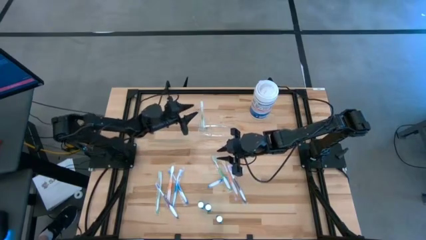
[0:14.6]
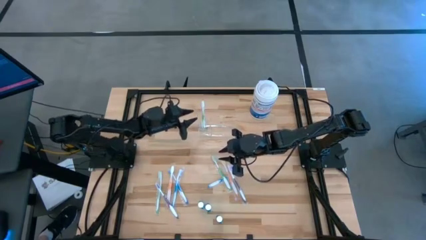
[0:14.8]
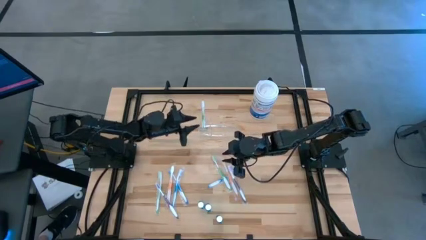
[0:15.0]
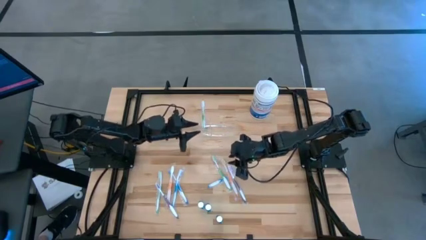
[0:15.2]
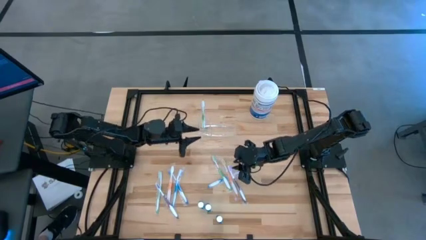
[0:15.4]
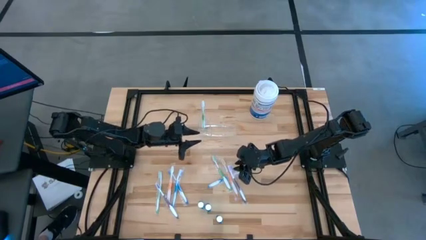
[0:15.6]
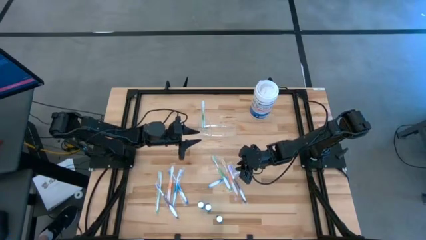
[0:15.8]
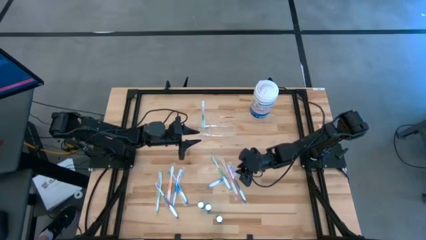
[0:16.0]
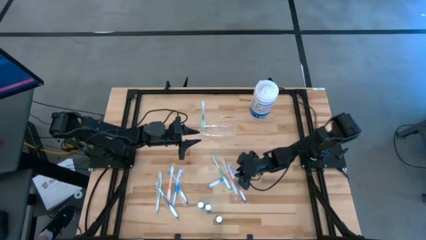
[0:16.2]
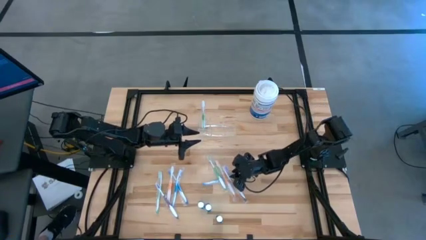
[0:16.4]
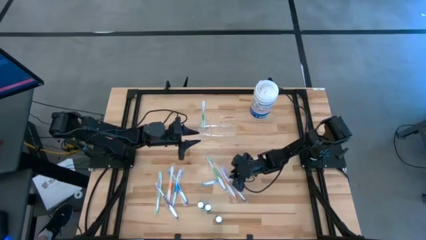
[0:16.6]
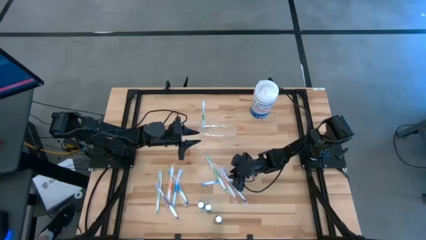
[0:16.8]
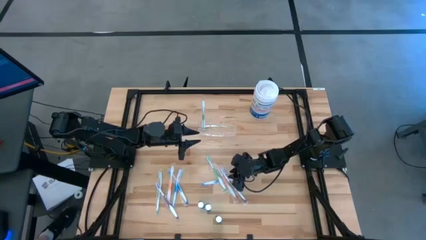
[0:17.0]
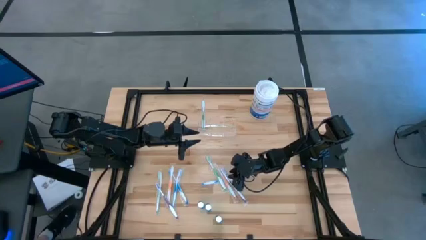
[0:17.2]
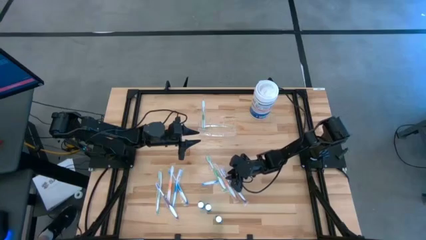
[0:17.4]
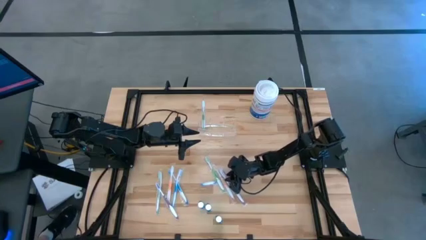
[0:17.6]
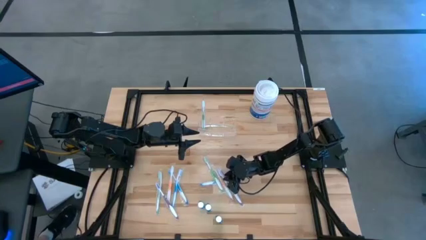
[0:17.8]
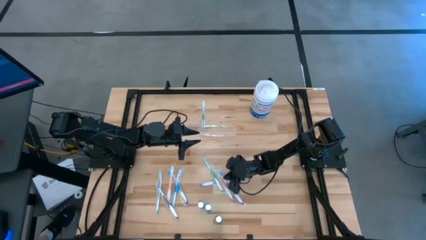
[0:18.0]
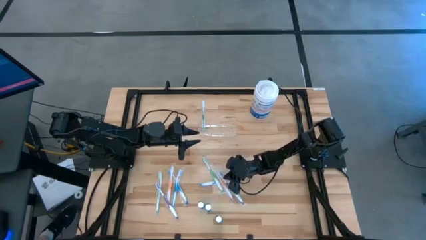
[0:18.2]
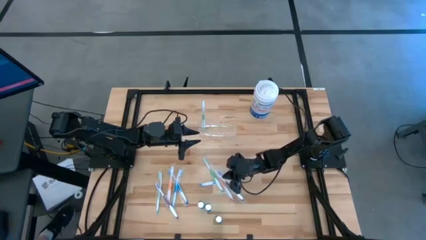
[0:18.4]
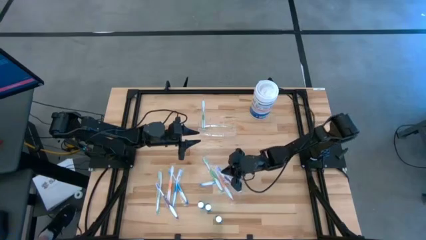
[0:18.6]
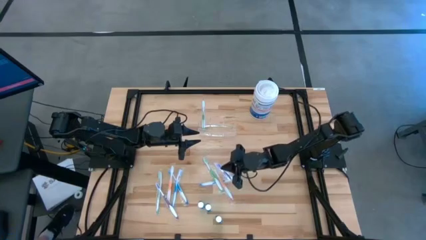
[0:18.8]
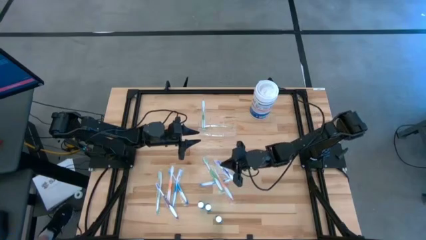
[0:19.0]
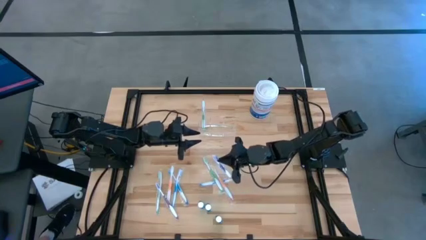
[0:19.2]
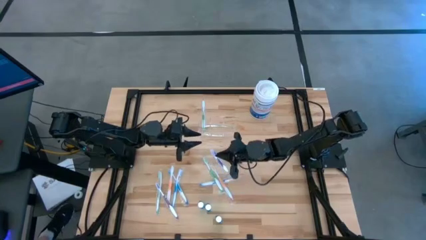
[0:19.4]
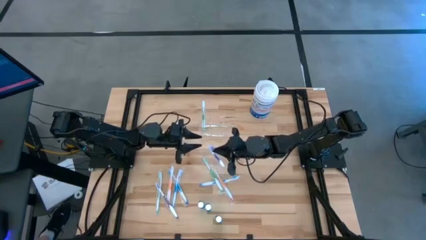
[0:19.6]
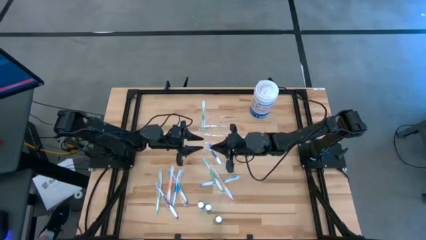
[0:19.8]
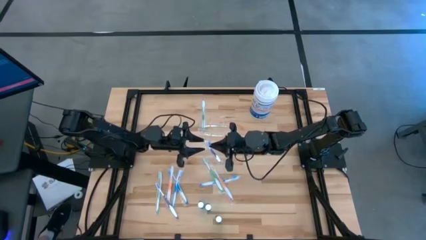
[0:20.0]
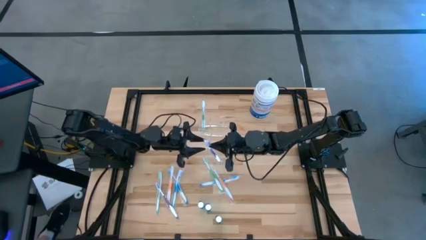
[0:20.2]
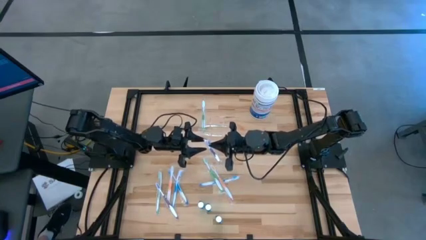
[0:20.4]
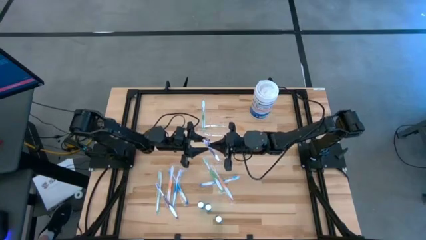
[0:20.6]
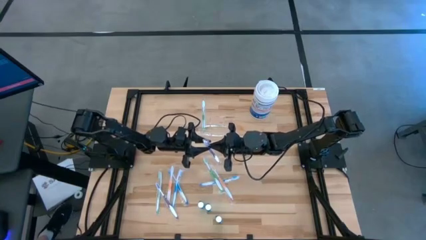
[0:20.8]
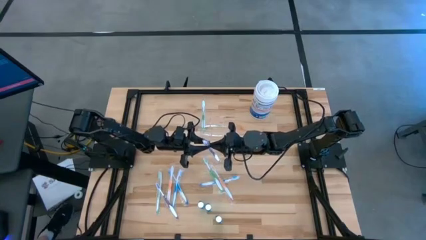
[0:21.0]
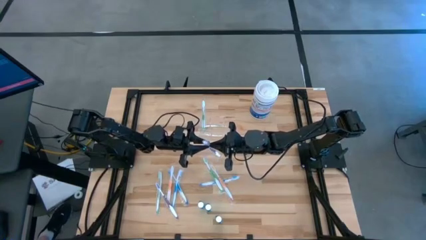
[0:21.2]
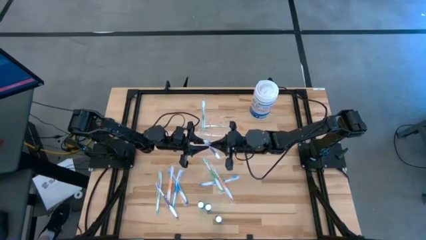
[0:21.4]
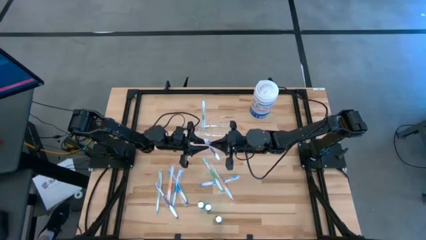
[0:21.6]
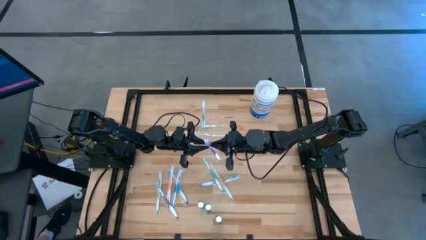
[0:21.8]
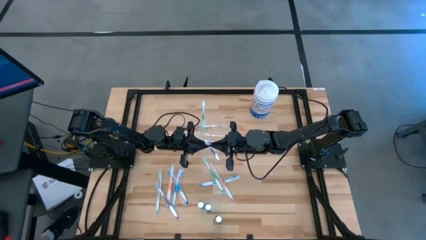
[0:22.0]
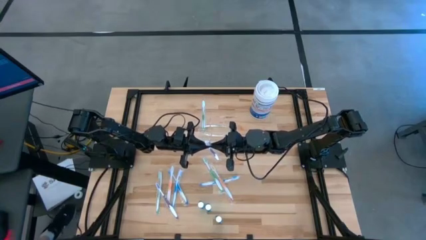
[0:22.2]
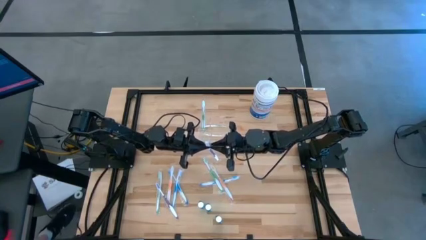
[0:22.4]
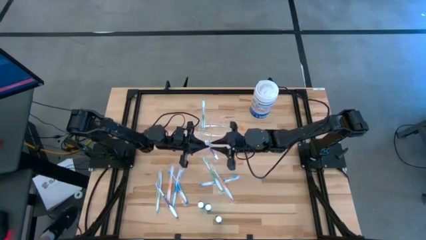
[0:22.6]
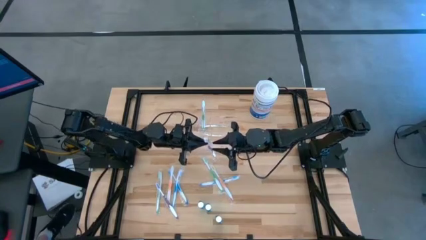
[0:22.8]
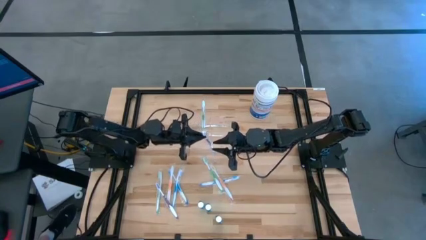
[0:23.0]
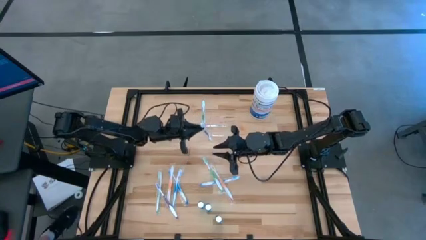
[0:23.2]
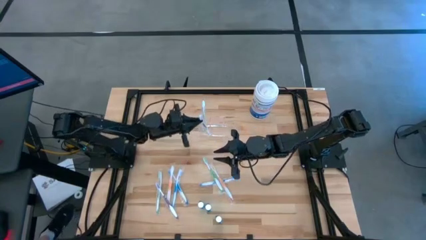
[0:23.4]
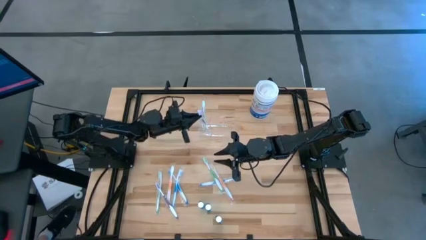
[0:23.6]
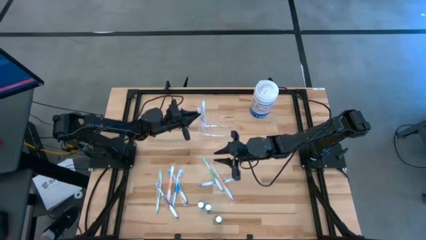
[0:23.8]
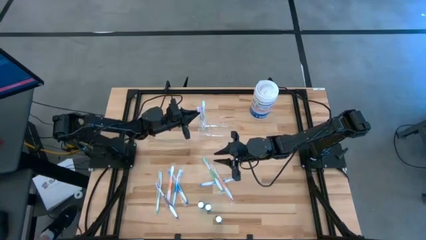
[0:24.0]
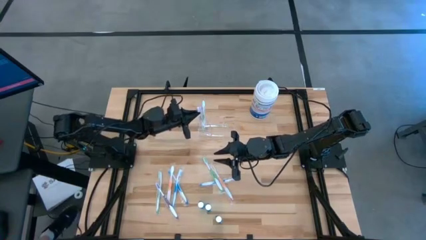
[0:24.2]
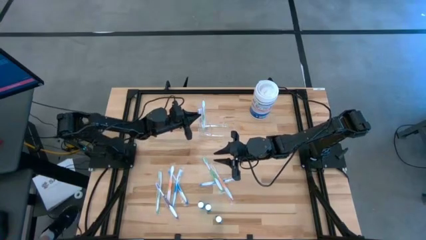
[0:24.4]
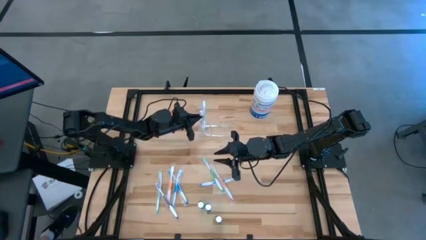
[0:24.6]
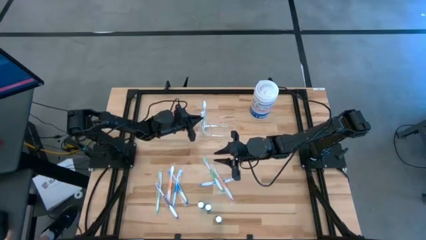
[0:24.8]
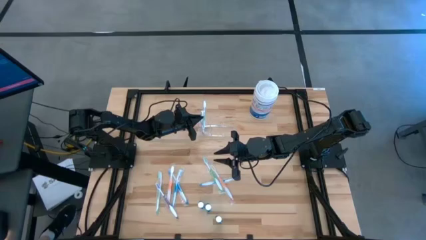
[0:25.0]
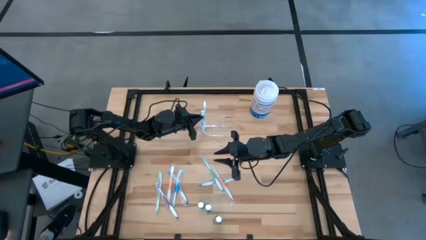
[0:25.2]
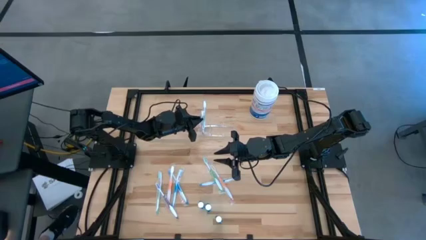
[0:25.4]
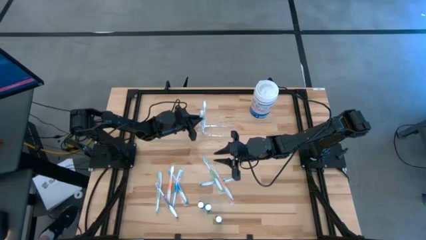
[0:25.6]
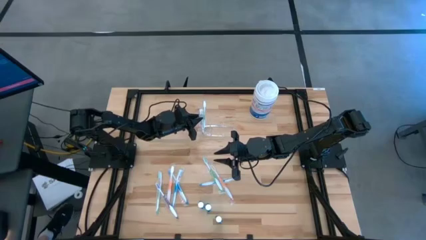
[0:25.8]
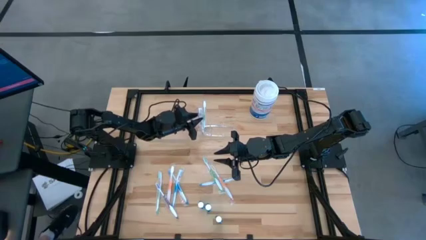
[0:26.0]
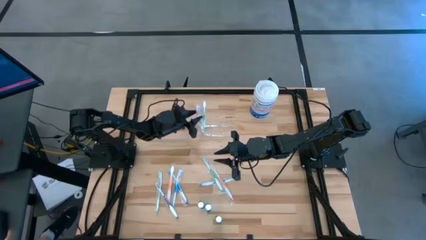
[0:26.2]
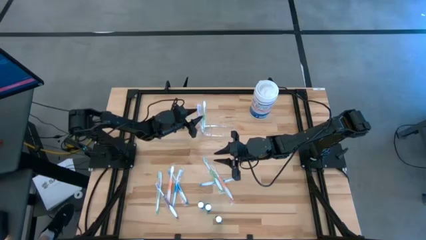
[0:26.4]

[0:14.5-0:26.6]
Task: Pick & Place toothbrushing station
Put the right purple toothbrush into the transparent organizer
